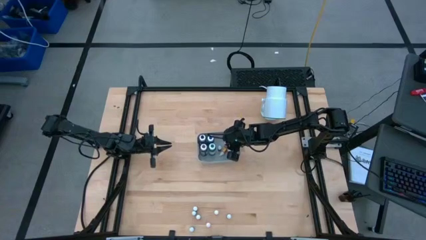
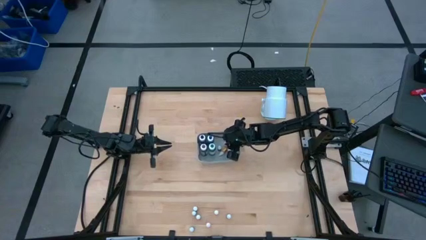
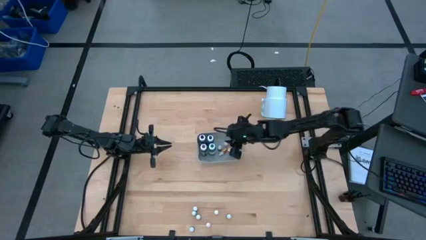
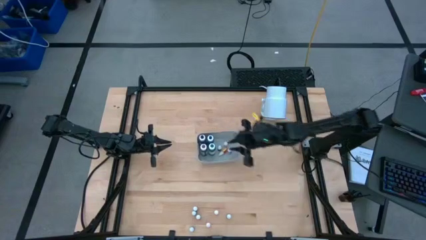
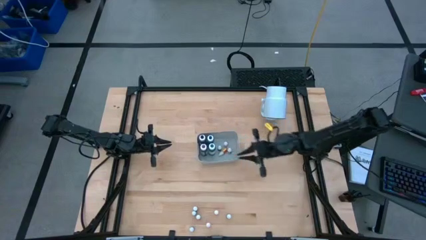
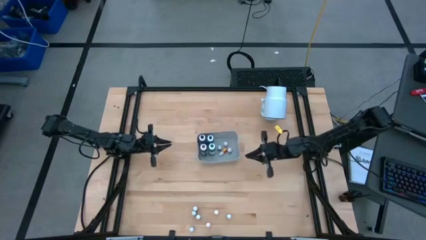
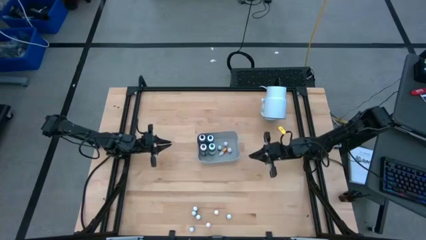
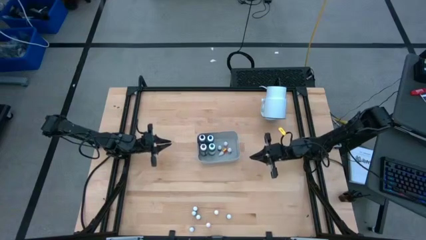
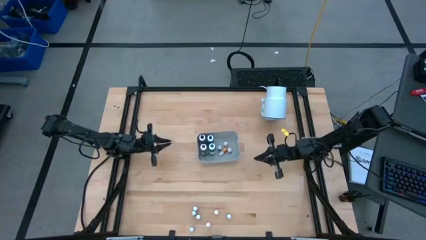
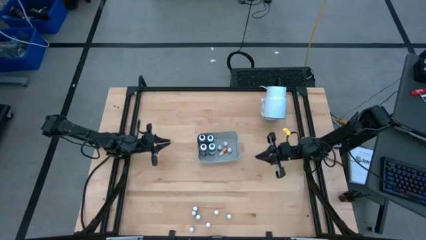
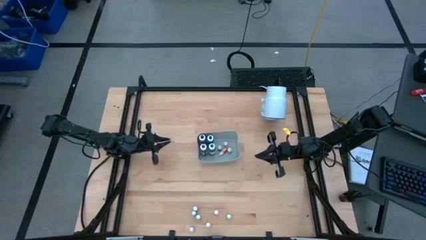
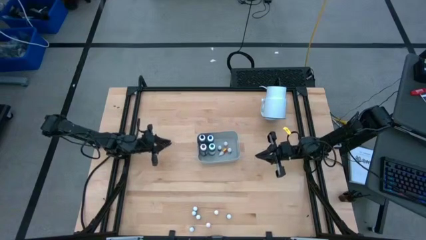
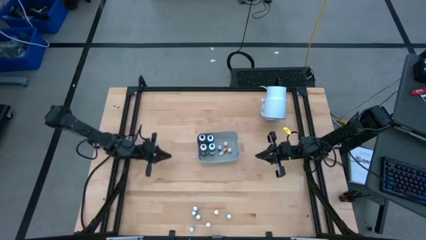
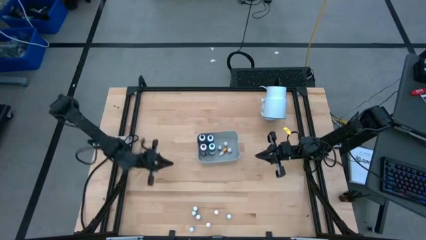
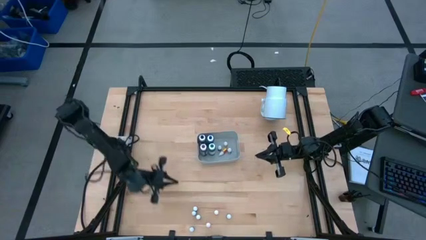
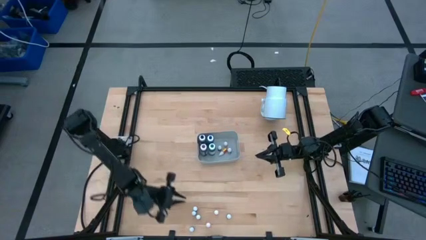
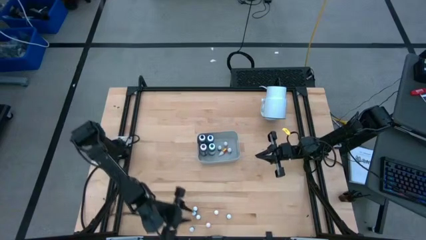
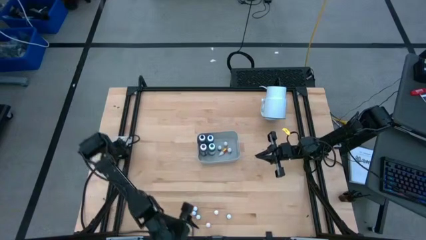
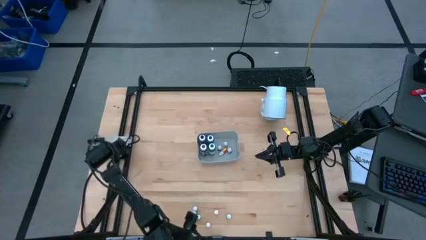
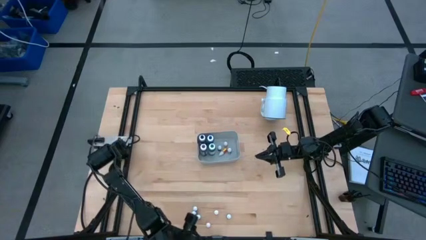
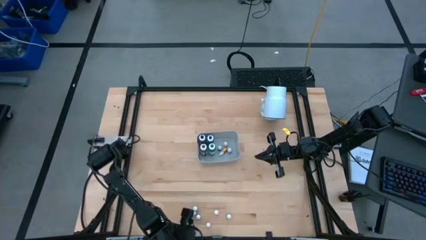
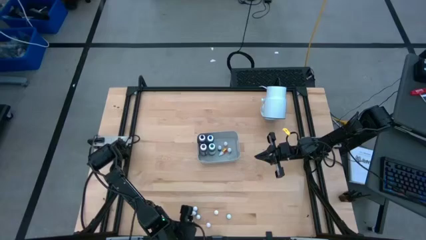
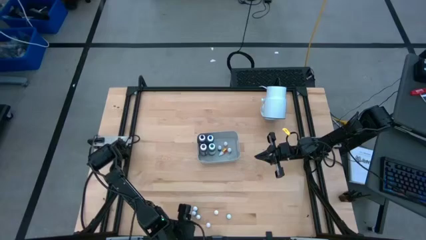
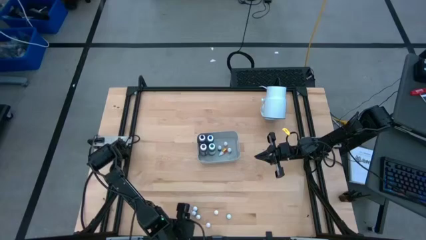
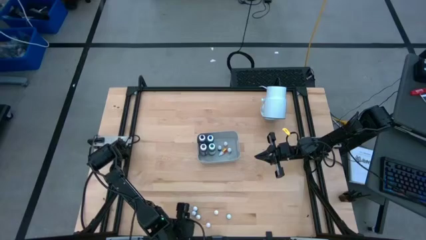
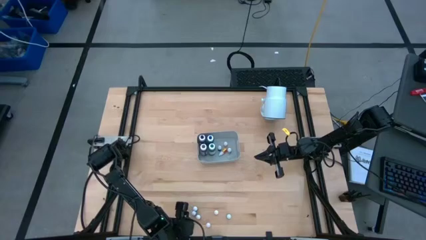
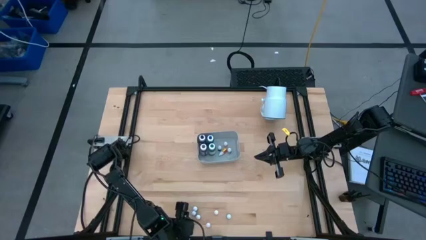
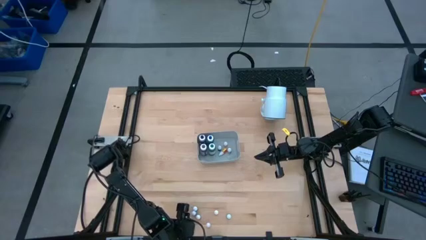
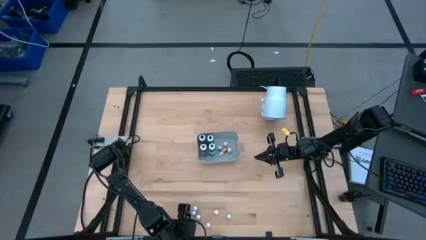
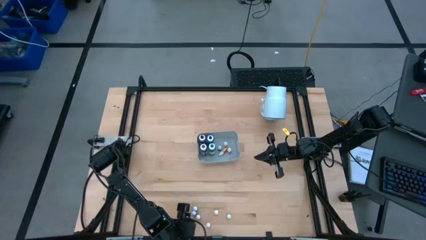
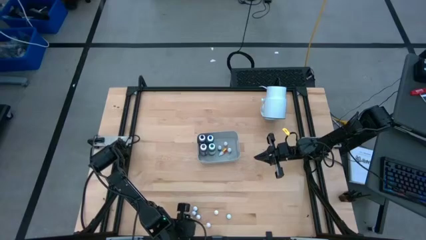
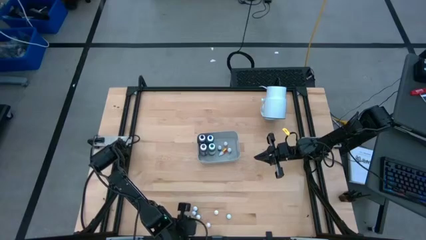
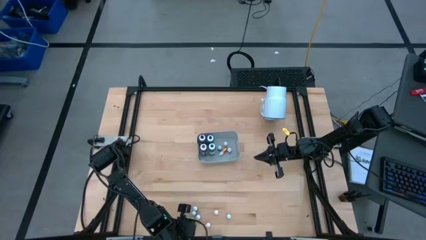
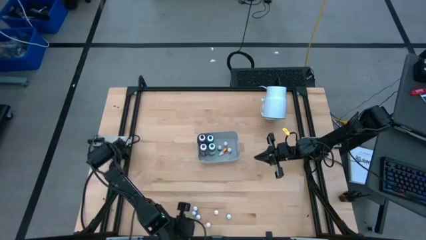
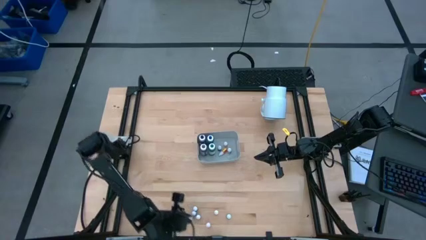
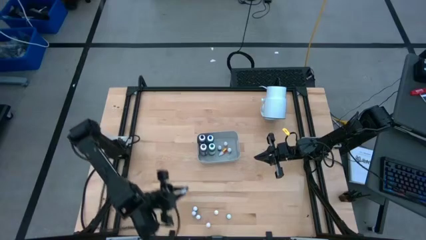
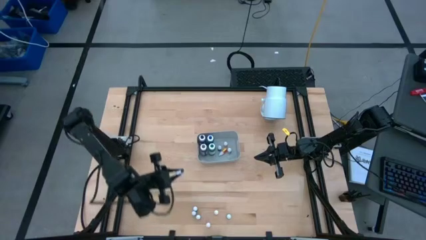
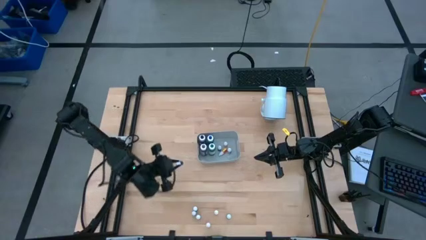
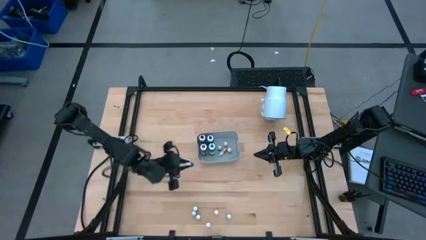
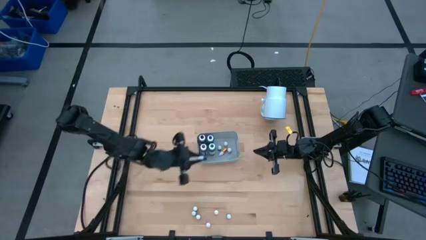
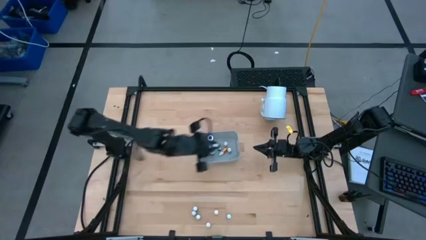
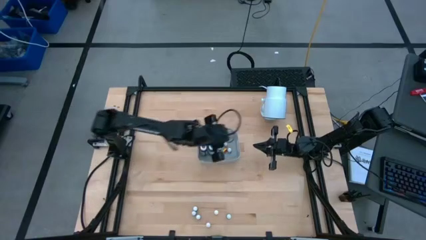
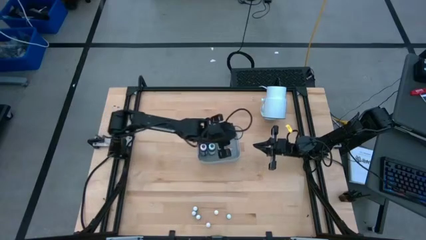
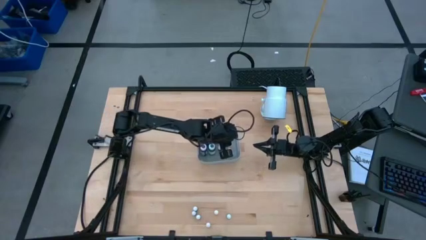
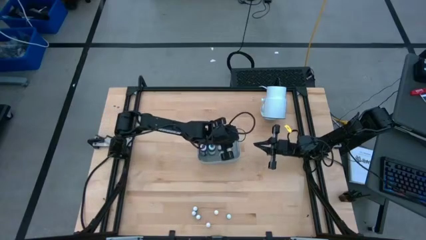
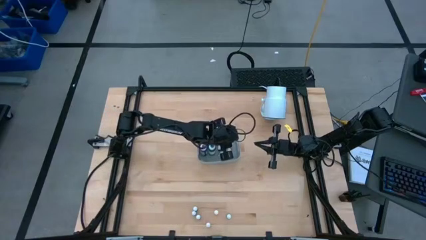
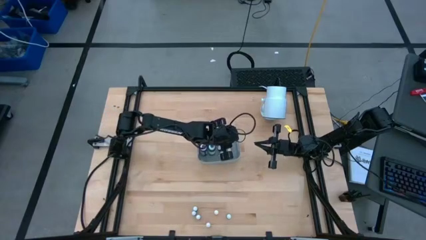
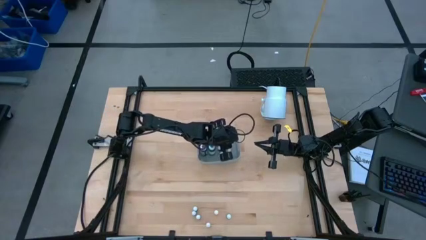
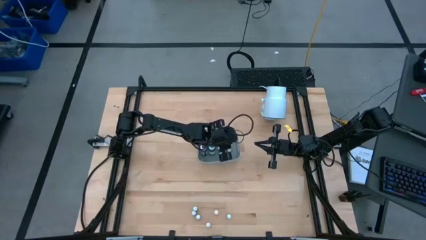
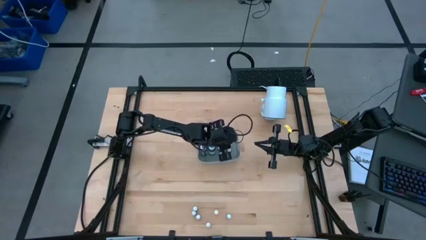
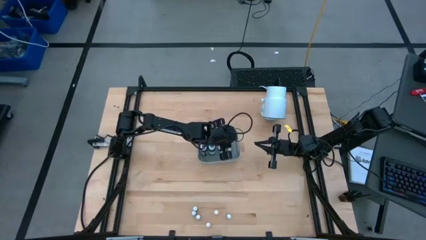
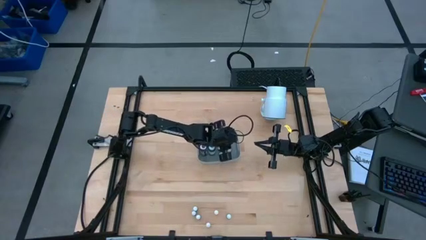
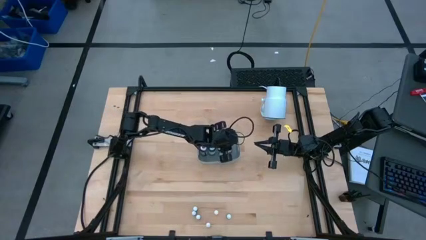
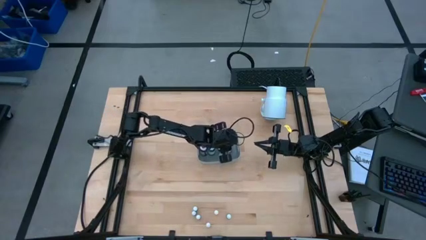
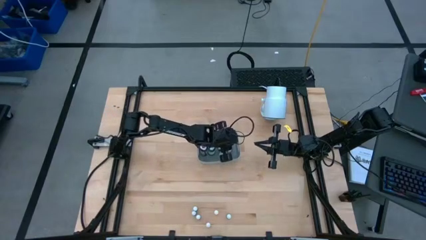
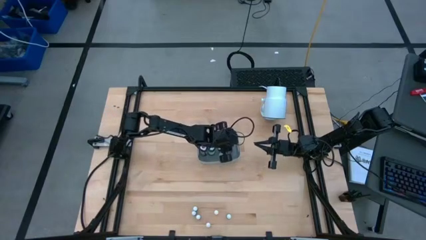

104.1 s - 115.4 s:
Task: Pick & Place food coloring
Put the small blue food coloring bottle into the white bin

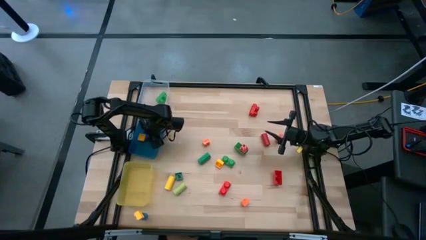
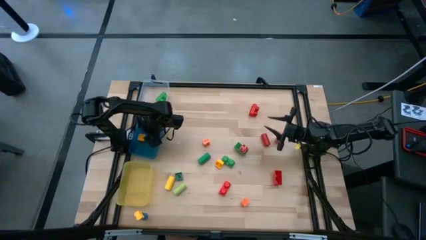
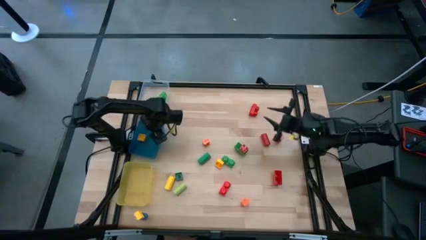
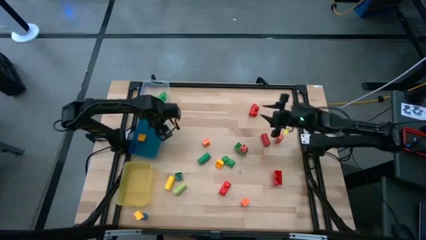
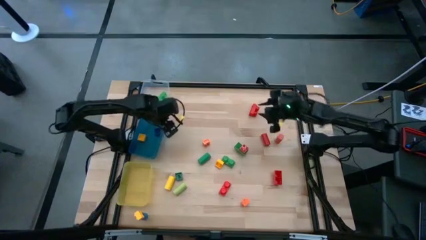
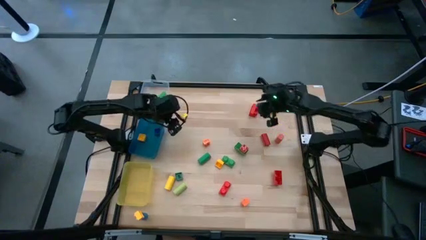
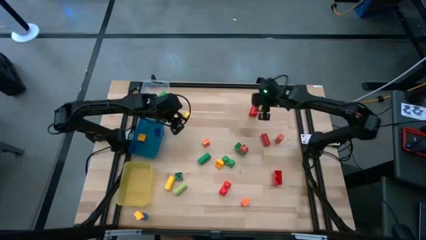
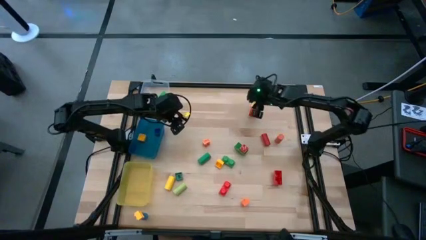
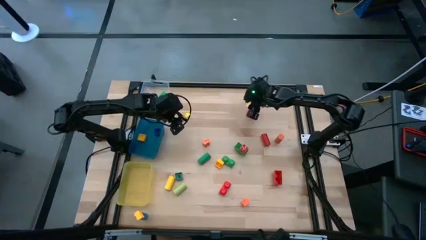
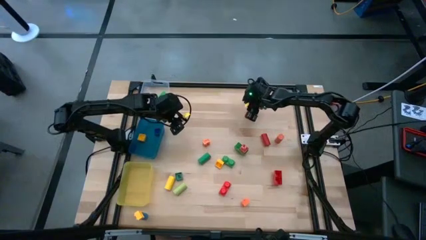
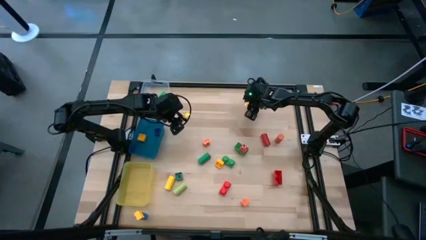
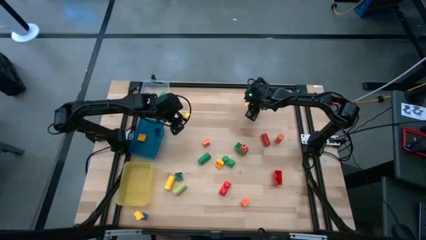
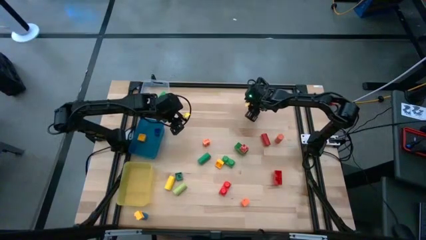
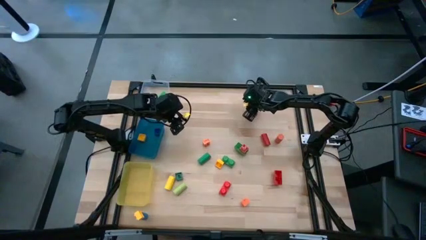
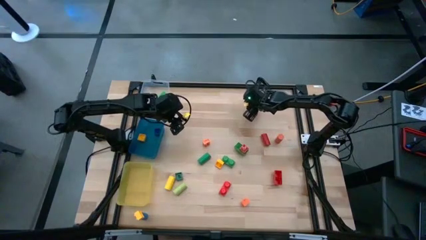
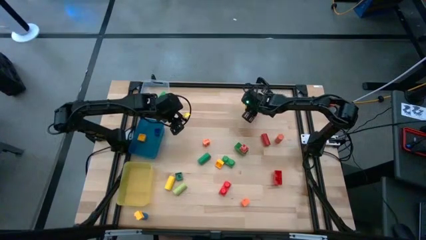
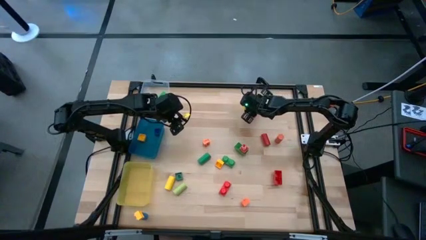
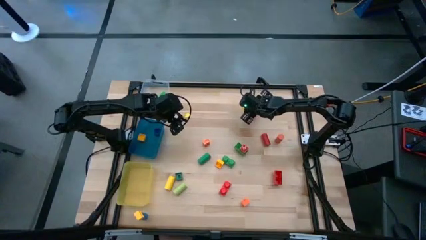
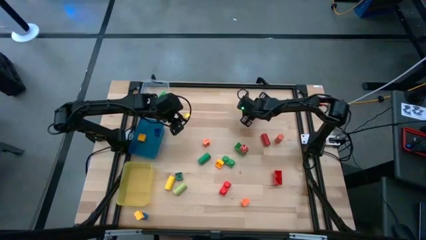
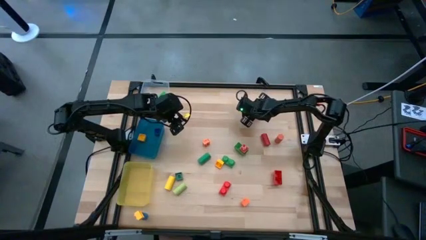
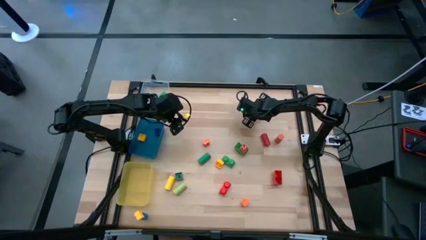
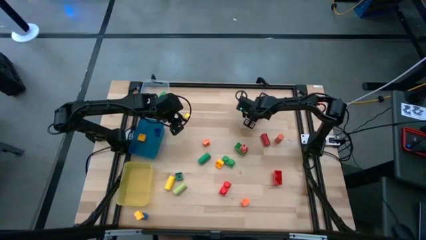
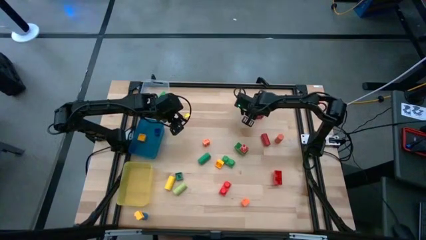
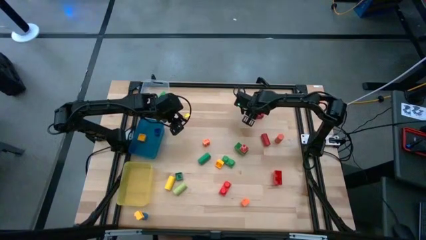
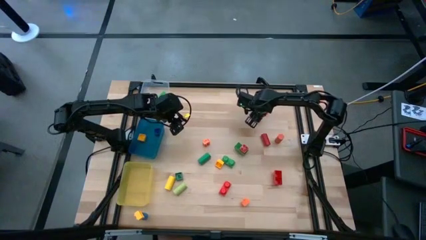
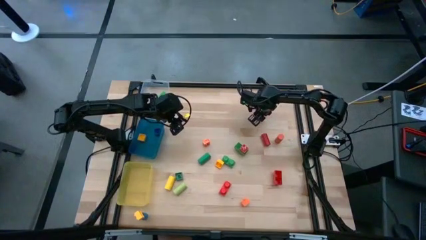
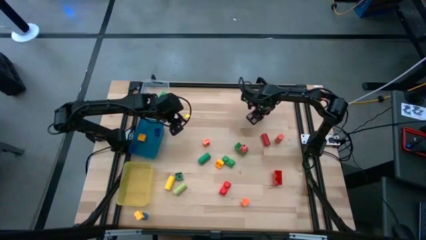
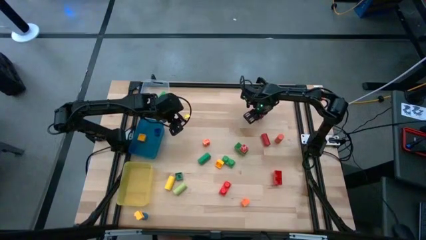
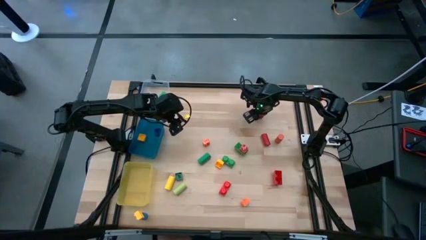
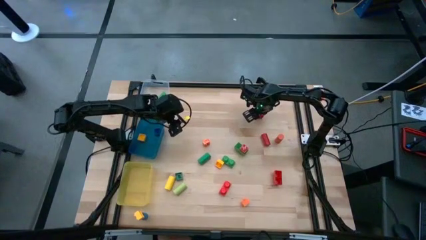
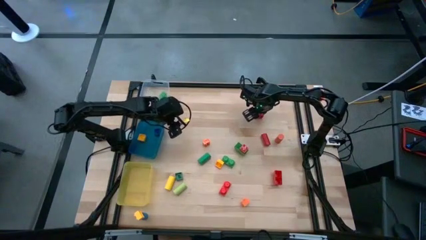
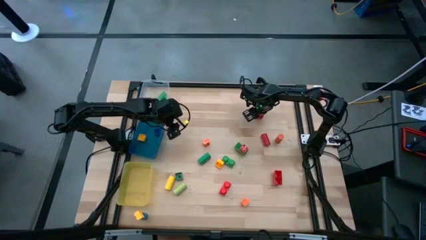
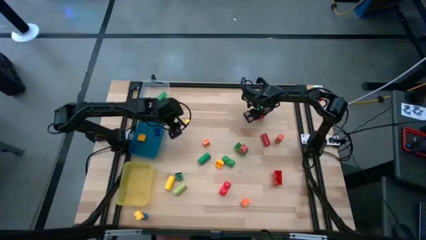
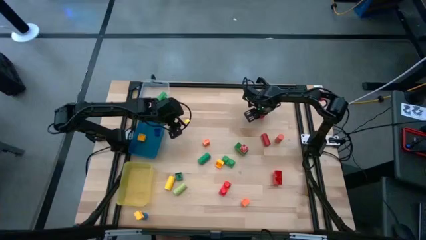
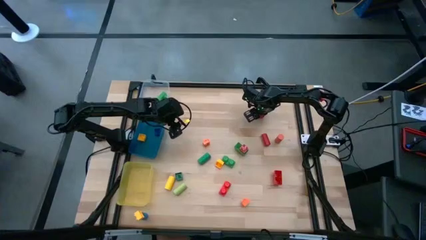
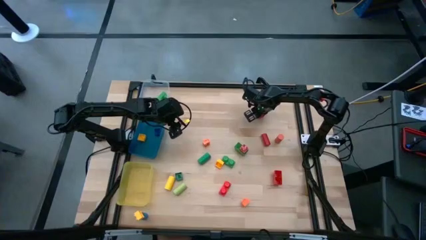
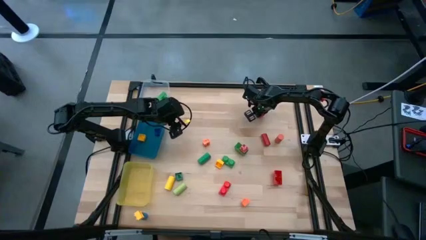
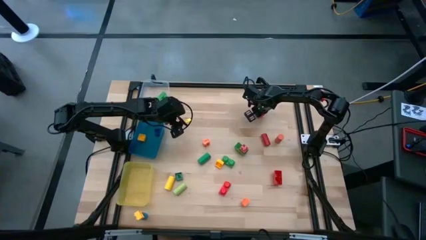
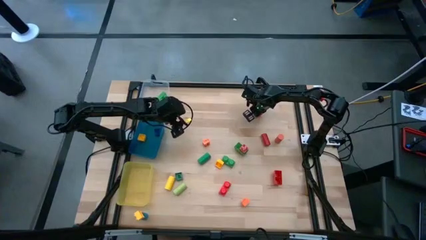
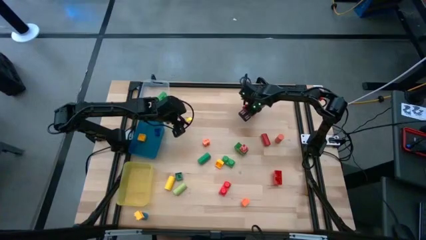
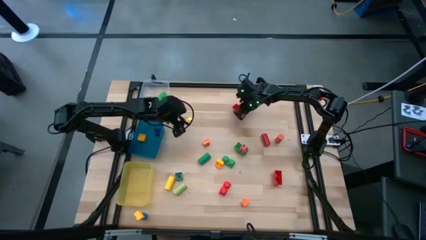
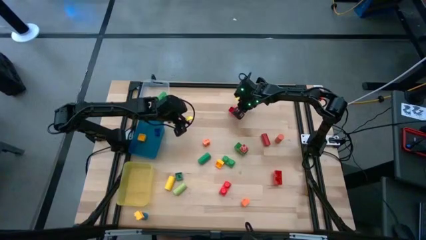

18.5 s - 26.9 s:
Task: Sort blocks by size
Put the top red 2 stud game piece into the transparent bin
